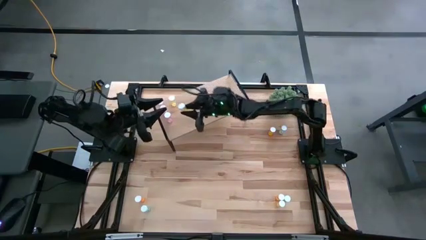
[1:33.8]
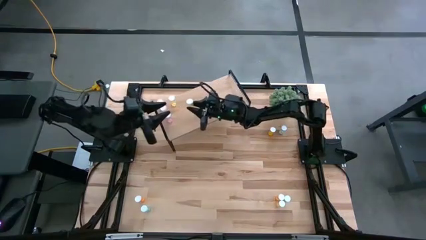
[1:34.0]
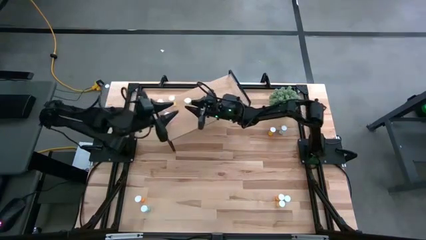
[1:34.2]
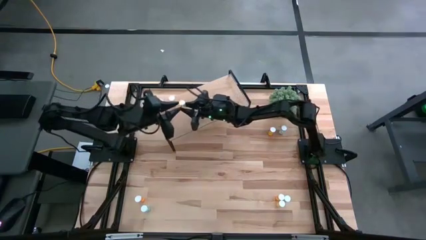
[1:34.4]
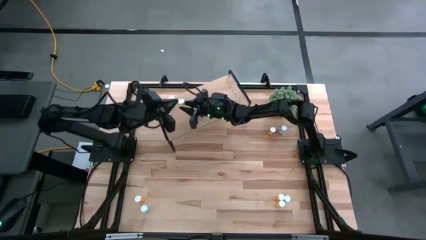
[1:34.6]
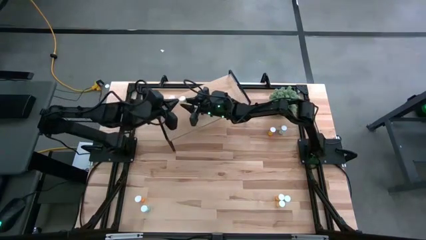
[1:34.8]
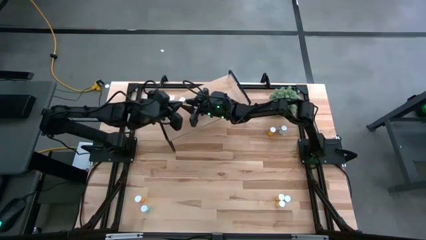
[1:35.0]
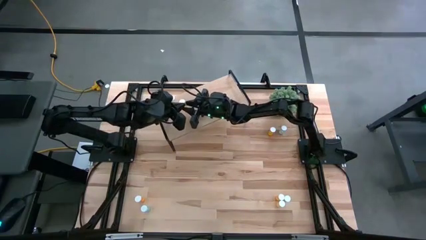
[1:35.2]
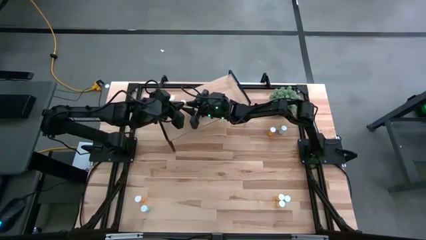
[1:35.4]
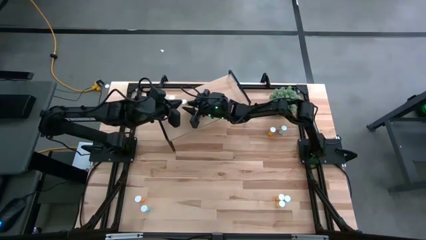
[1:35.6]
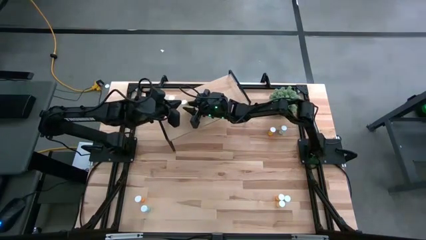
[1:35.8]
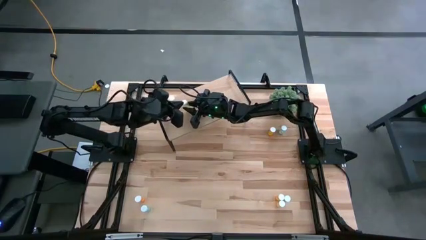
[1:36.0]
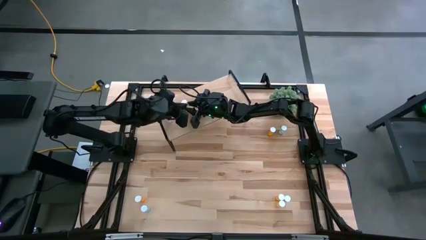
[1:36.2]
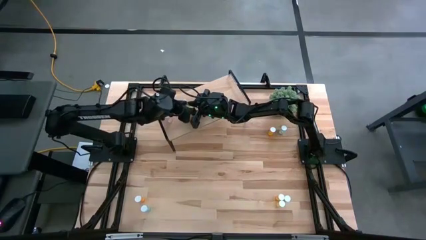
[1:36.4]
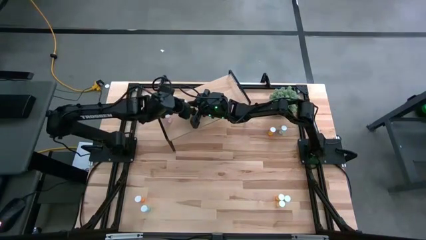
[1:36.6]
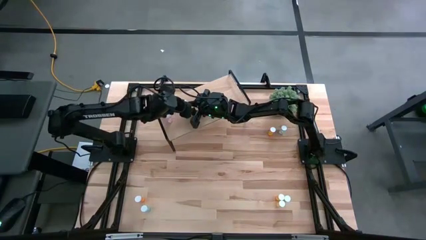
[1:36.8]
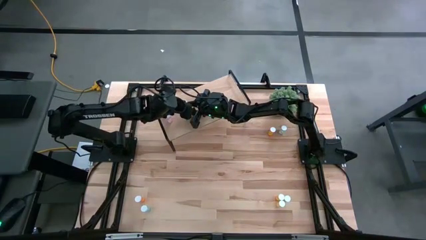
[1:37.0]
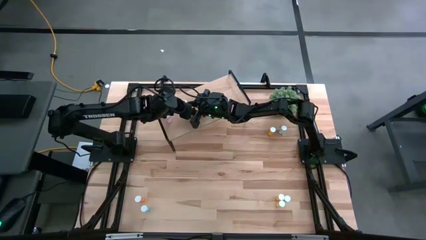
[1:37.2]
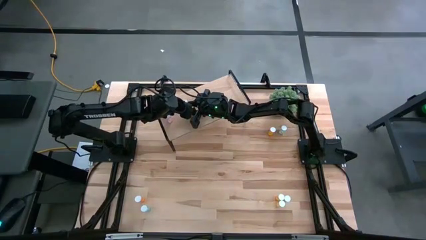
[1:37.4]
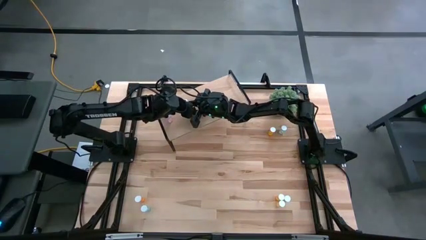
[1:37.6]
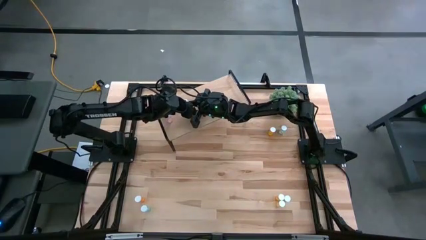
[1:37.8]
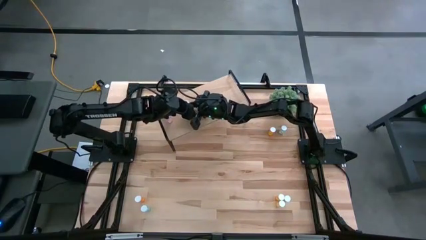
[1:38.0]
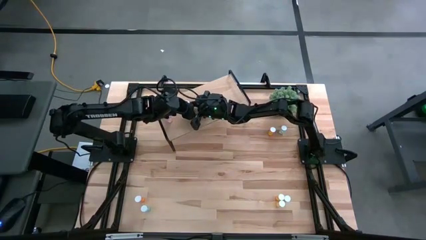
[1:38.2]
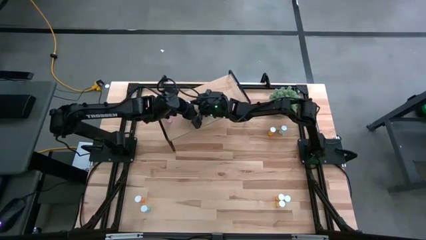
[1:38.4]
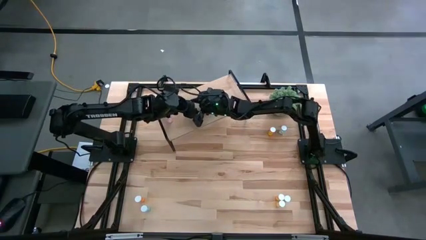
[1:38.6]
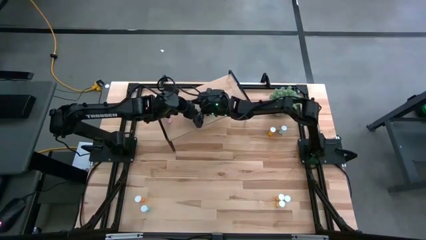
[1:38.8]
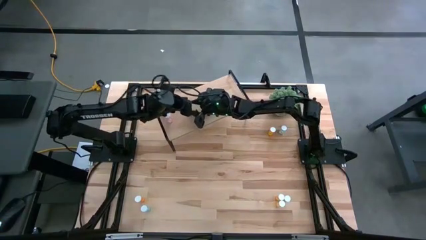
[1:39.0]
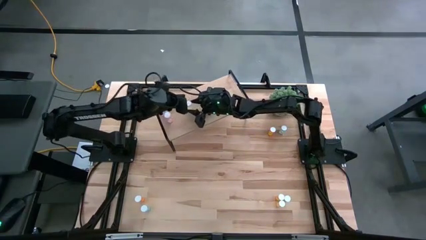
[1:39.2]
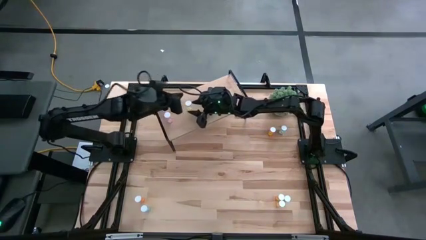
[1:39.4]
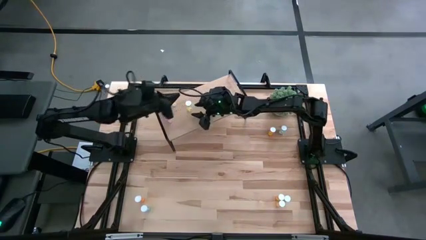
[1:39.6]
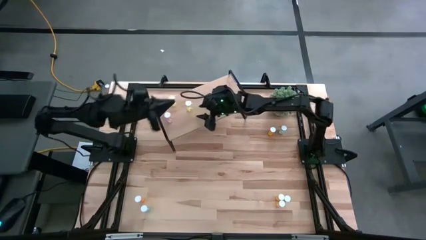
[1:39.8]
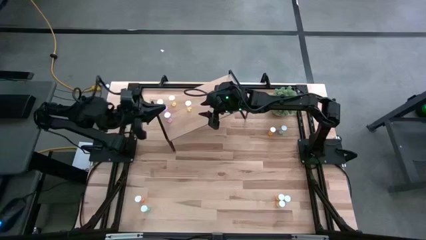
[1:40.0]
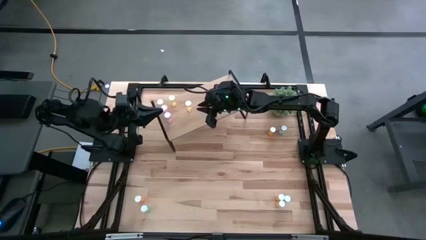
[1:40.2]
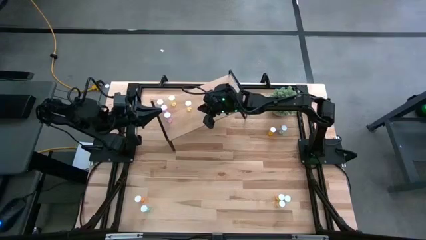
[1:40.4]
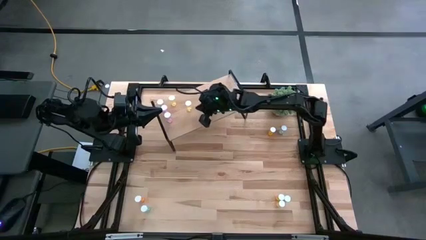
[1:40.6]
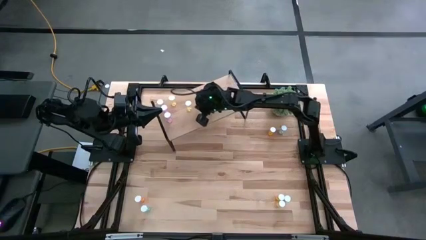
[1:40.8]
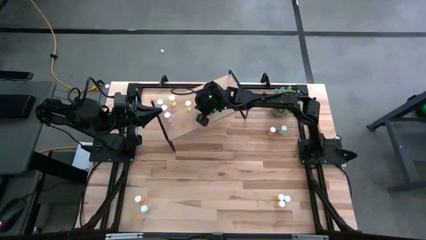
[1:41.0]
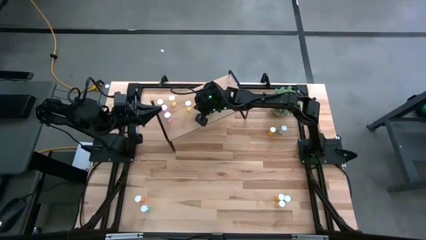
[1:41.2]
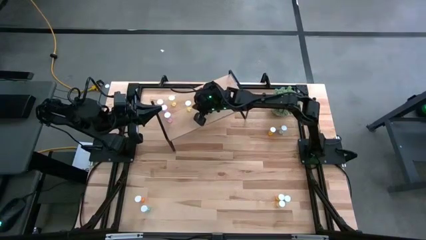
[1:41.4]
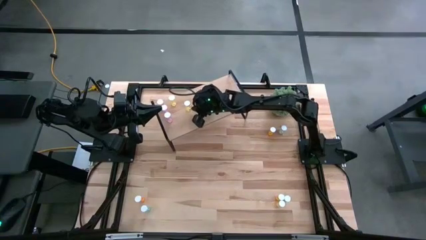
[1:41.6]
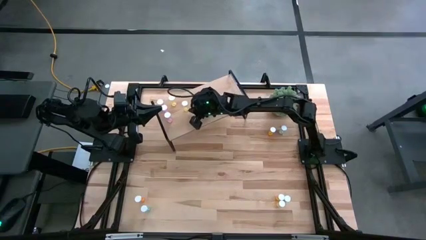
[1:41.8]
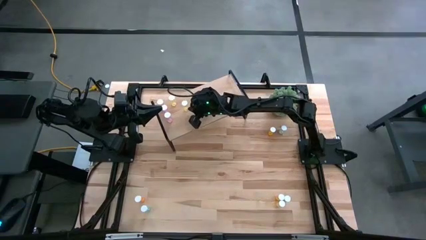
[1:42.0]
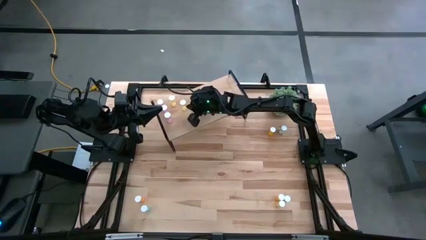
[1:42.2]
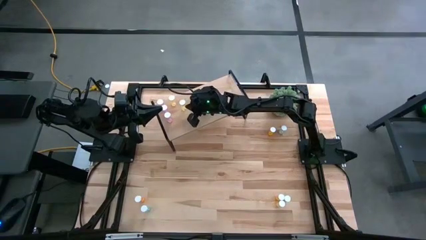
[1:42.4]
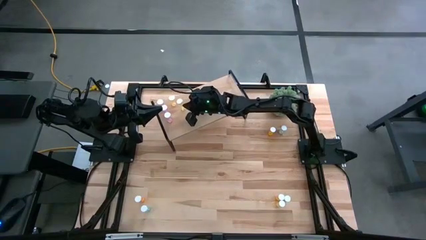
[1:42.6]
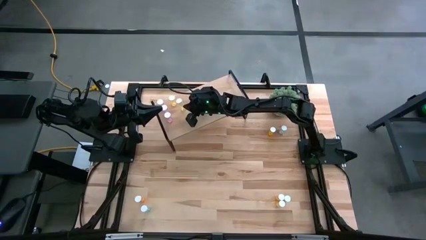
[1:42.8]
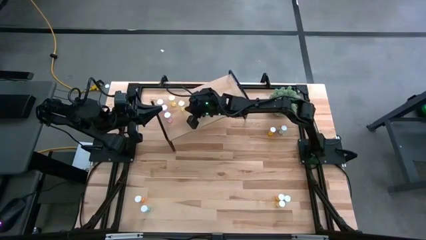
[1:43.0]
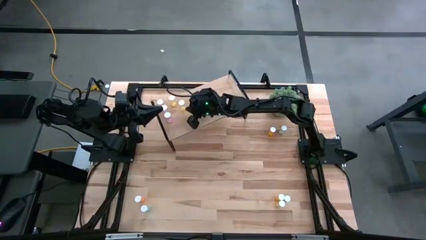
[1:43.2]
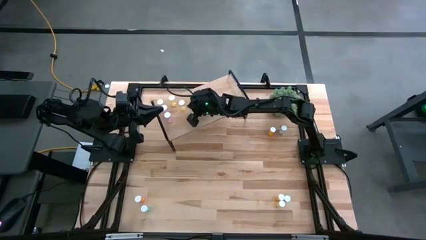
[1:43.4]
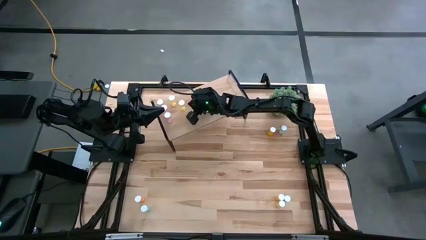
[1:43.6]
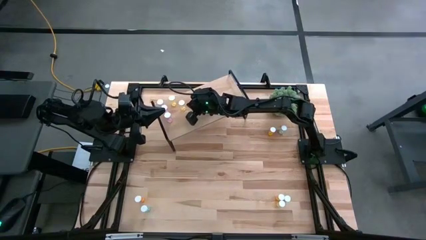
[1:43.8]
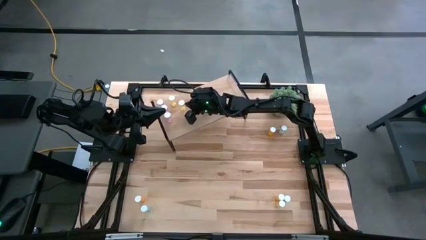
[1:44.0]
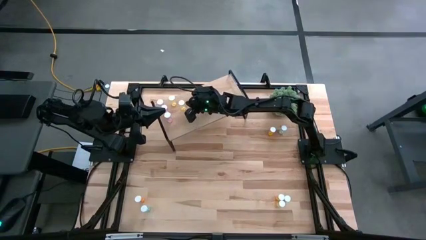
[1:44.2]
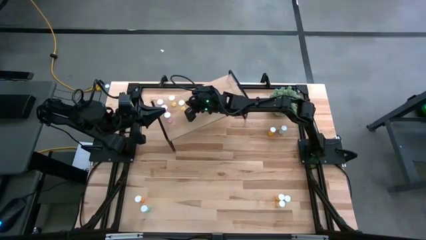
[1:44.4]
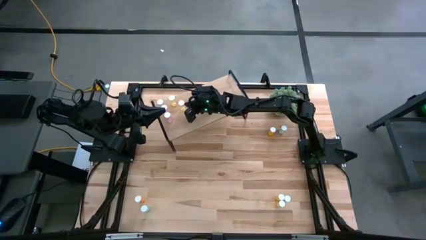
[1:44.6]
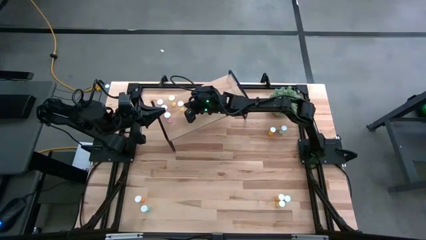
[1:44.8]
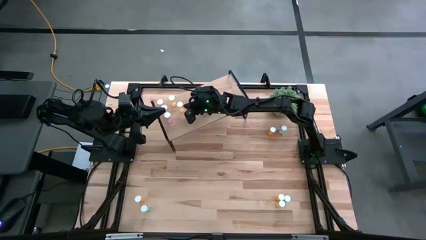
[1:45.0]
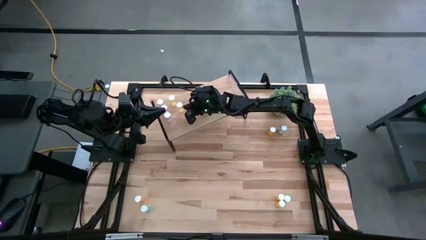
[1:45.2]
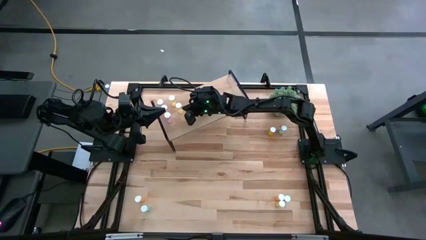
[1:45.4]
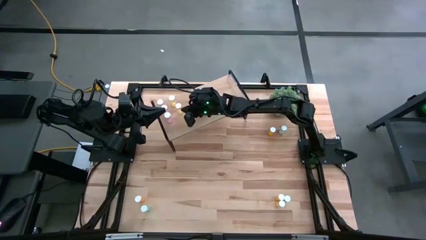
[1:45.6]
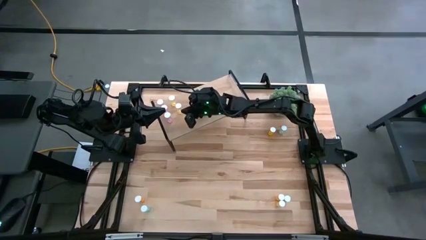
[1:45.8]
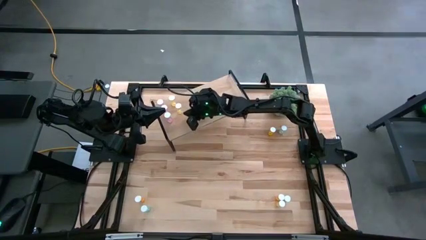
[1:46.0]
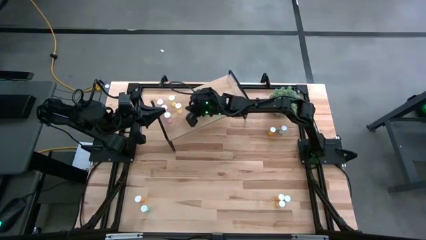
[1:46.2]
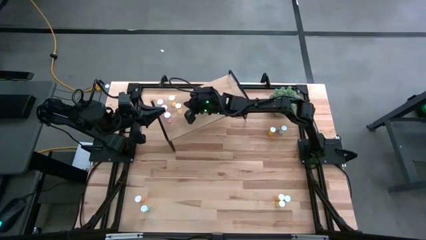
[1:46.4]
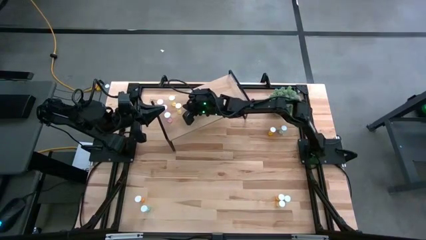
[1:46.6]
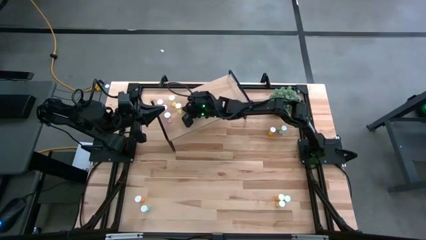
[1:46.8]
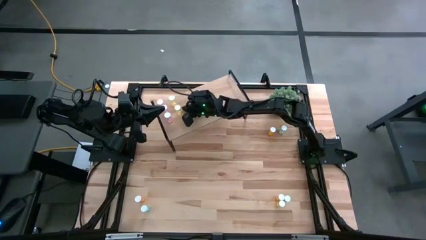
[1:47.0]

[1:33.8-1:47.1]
Task: Pick and place medicine bottles onto shelf by color
Put the left yellow pill bottle on the shelf aligned with the other yellow pill bottle

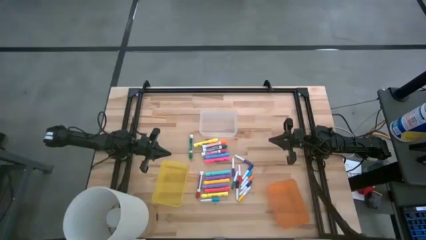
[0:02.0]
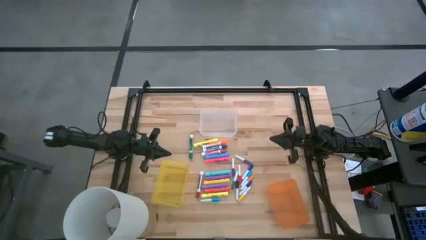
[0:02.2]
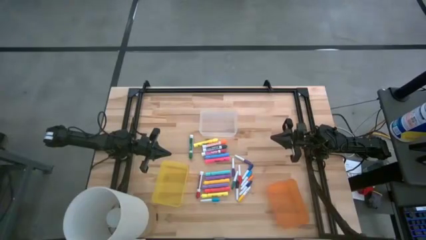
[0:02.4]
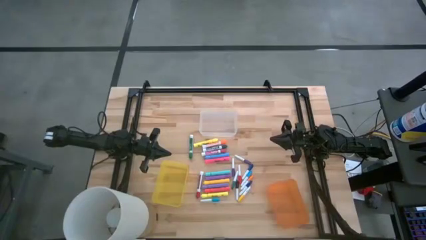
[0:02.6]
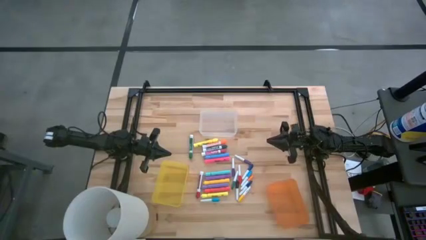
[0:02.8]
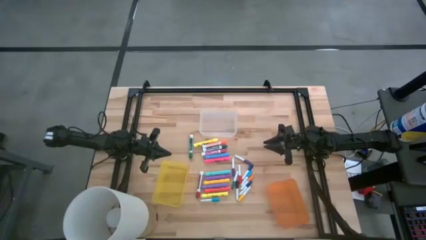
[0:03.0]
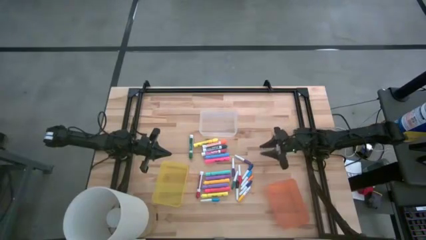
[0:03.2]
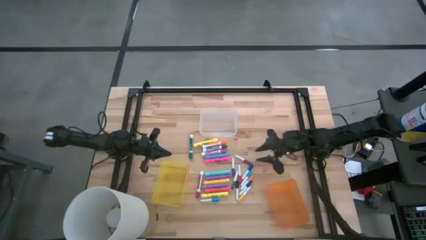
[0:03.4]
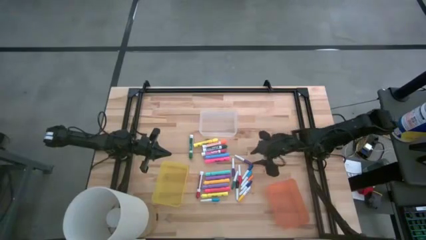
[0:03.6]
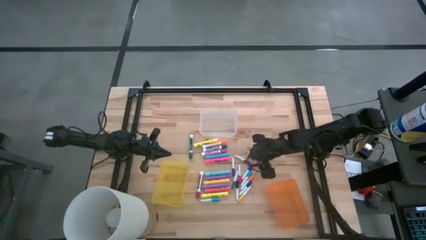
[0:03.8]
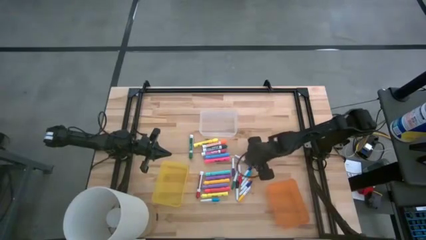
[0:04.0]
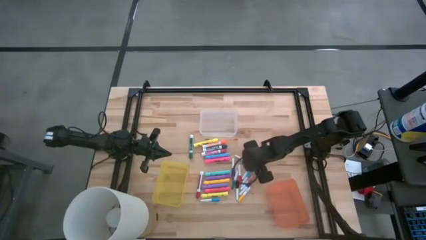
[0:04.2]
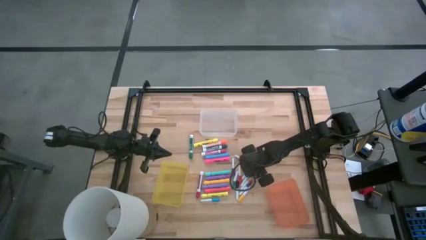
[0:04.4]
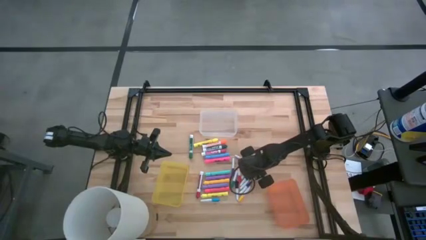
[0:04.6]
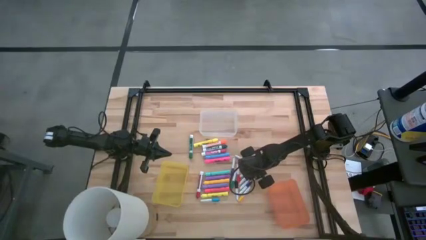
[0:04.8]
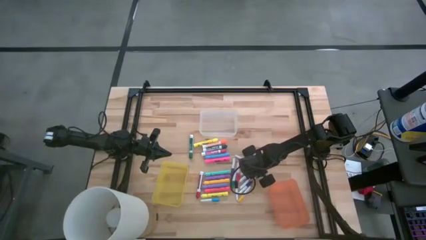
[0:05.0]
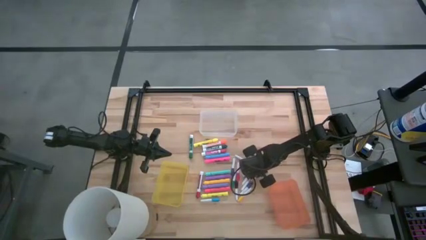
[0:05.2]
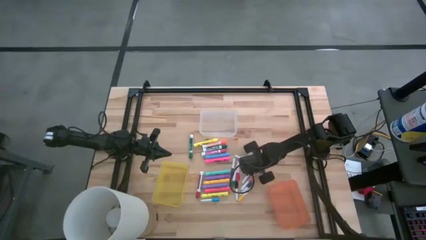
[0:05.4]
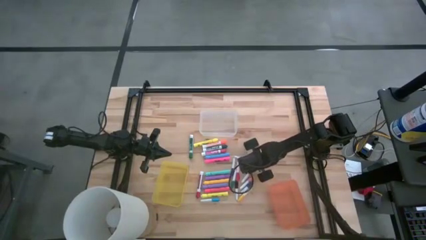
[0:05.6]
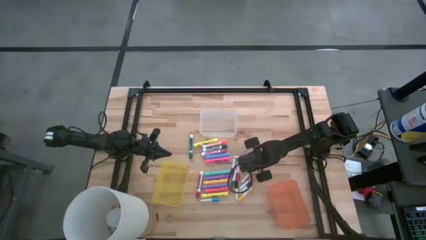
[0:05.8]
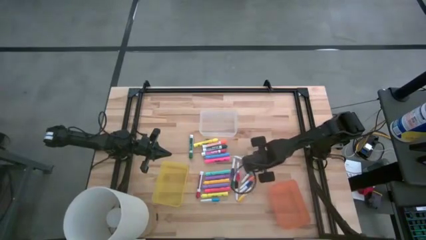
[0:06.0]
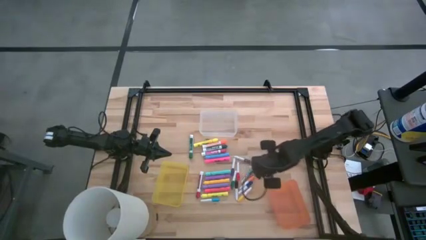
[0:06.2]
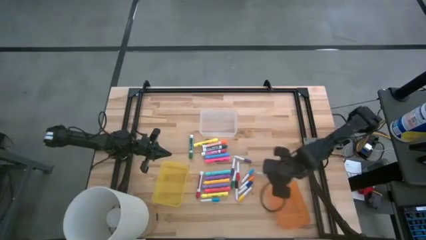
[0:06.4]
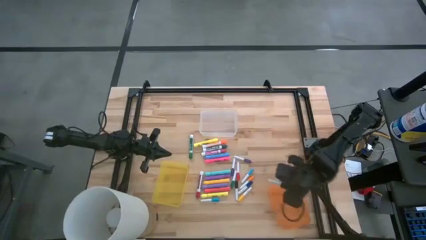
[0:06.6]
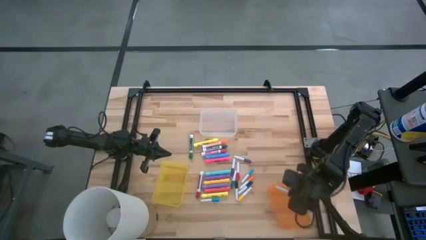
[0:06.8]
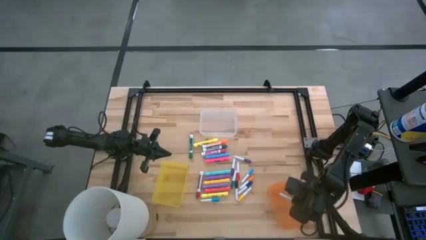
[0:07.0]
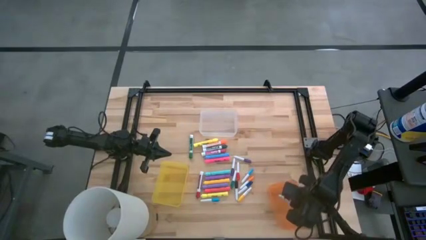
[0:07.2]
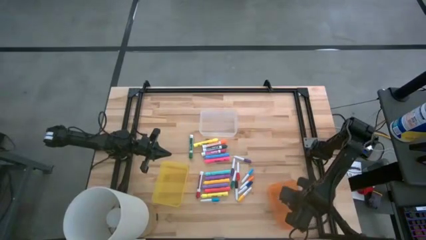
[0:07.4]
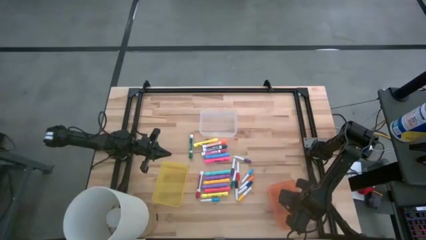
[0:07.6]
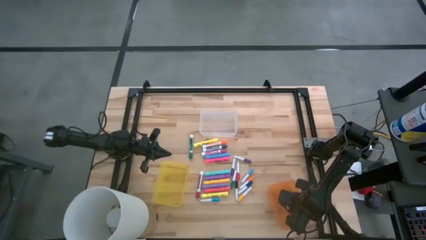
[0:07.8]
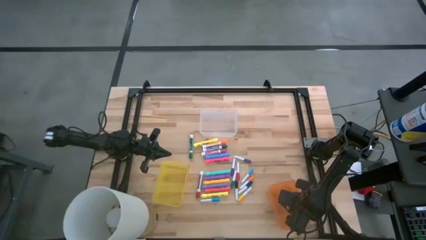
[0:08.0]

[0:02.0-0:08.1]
Task: Pick & Place Markers
Put the top small dark blue highlighter pen into the orange bin
